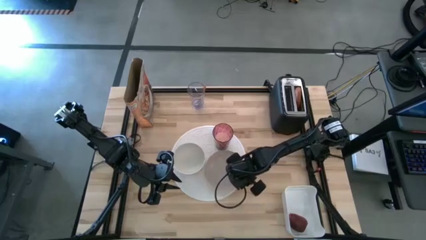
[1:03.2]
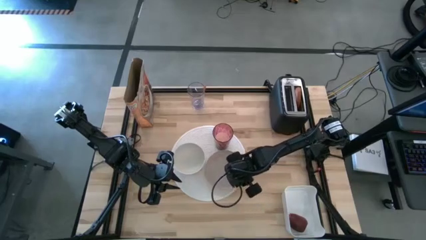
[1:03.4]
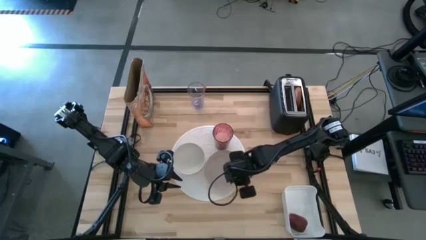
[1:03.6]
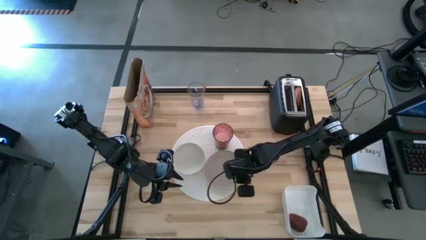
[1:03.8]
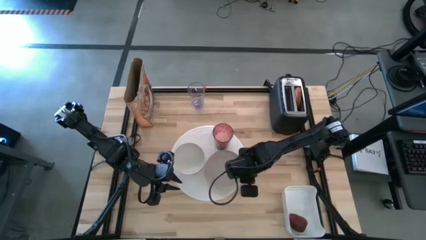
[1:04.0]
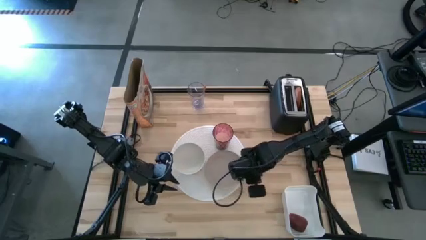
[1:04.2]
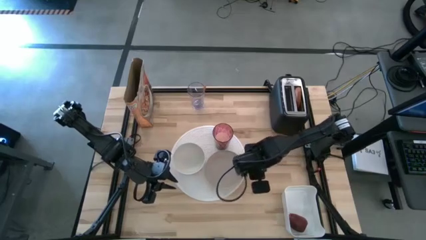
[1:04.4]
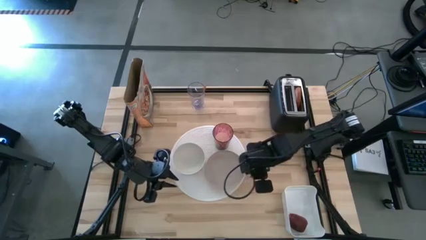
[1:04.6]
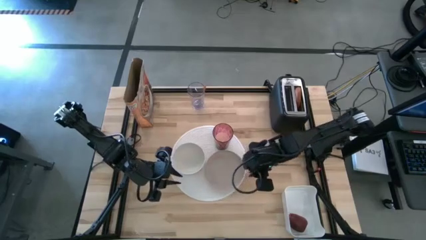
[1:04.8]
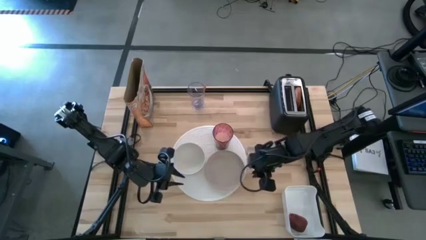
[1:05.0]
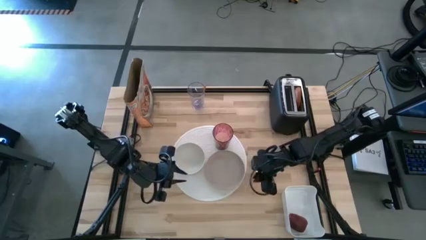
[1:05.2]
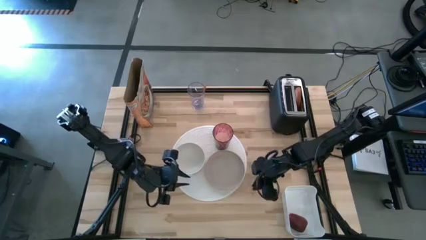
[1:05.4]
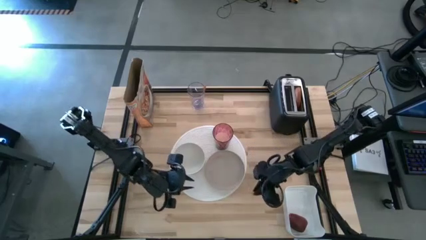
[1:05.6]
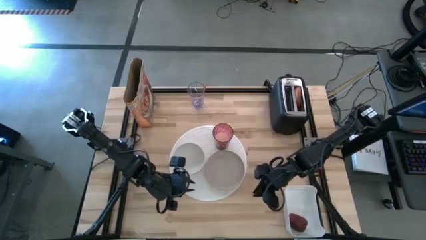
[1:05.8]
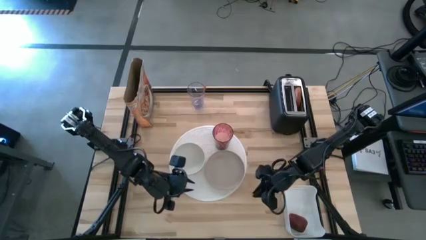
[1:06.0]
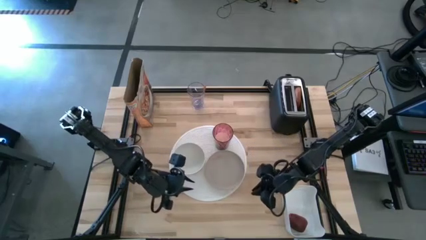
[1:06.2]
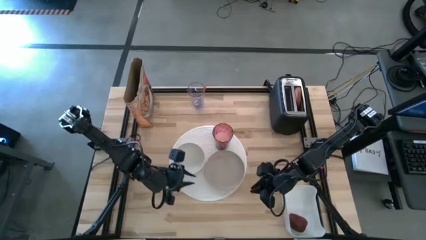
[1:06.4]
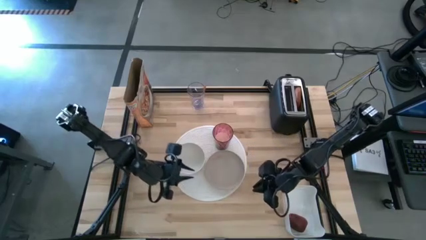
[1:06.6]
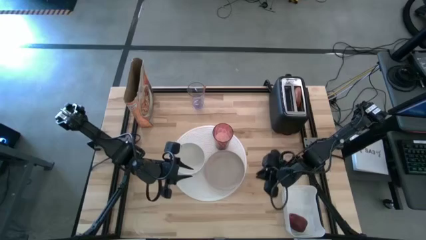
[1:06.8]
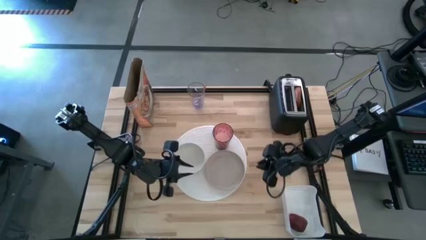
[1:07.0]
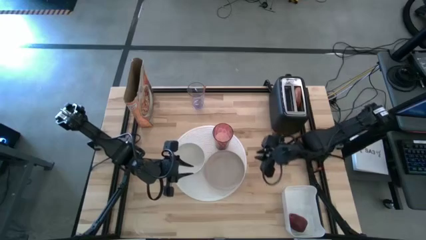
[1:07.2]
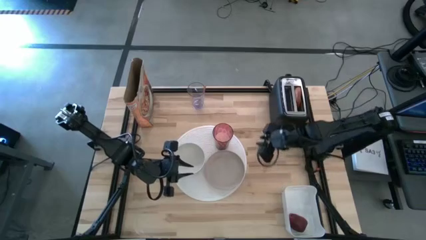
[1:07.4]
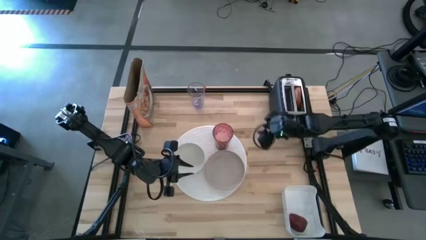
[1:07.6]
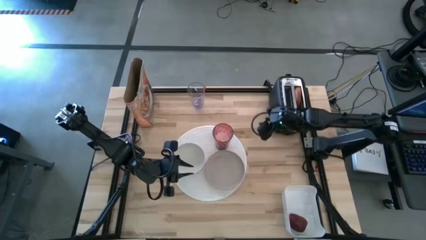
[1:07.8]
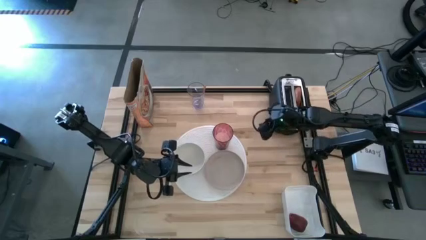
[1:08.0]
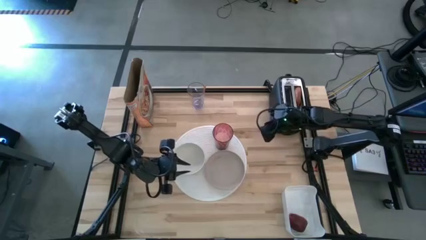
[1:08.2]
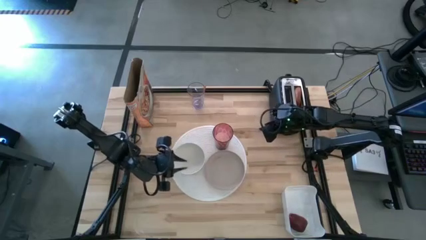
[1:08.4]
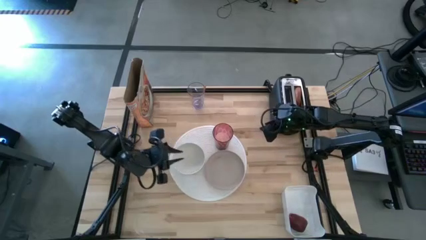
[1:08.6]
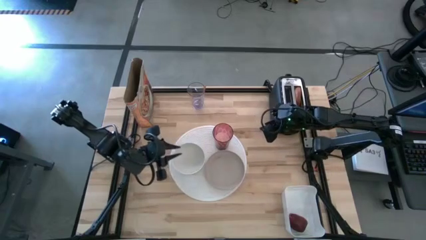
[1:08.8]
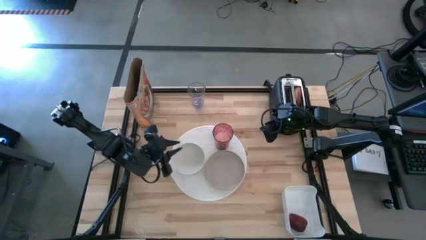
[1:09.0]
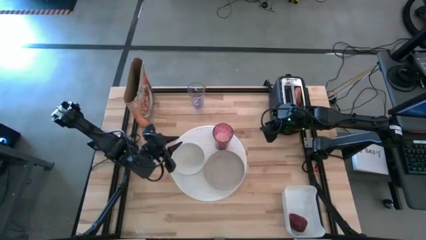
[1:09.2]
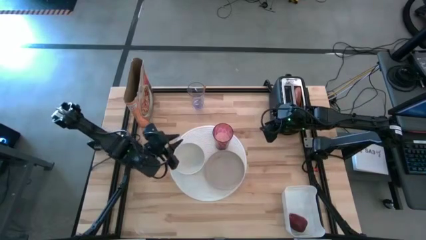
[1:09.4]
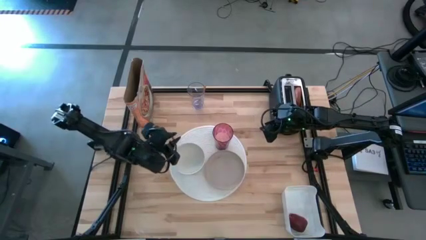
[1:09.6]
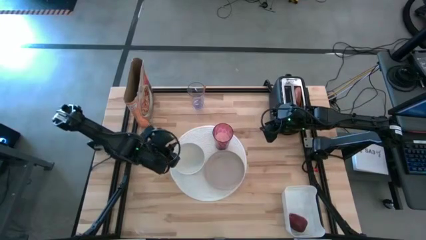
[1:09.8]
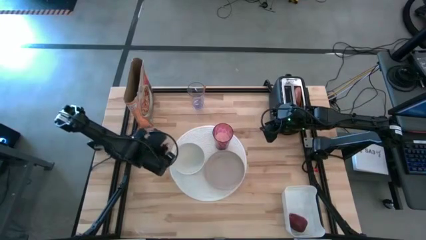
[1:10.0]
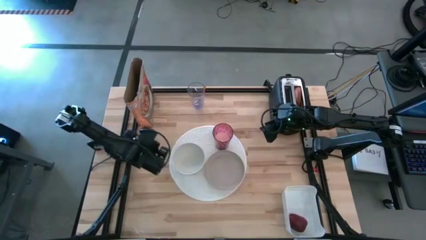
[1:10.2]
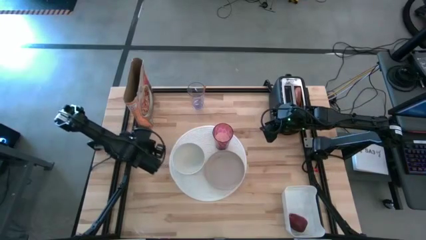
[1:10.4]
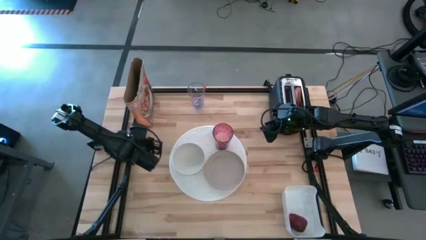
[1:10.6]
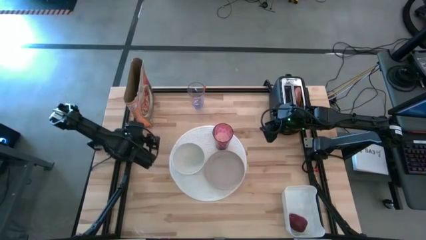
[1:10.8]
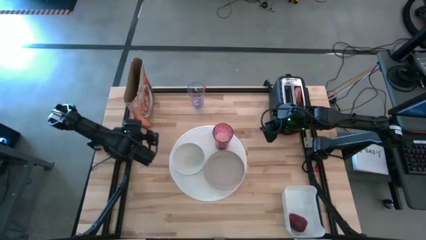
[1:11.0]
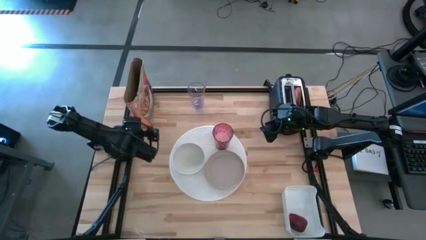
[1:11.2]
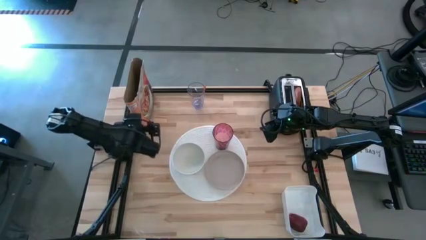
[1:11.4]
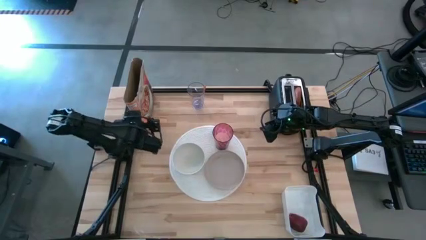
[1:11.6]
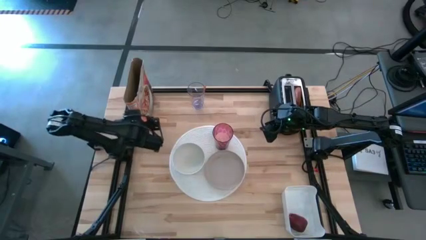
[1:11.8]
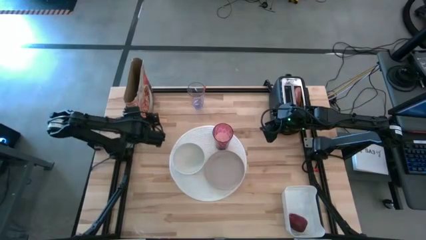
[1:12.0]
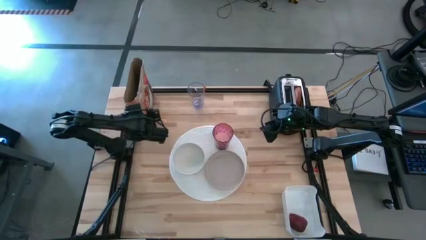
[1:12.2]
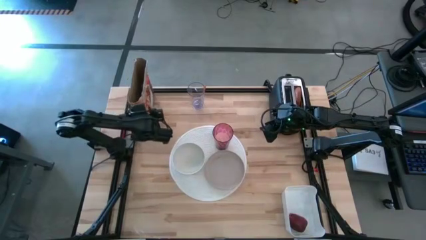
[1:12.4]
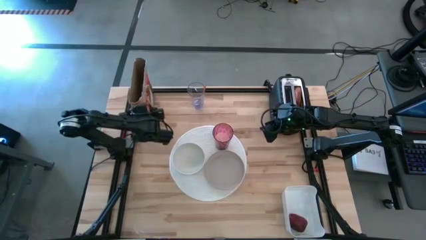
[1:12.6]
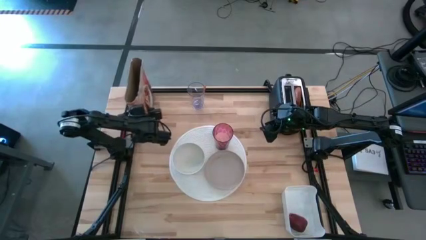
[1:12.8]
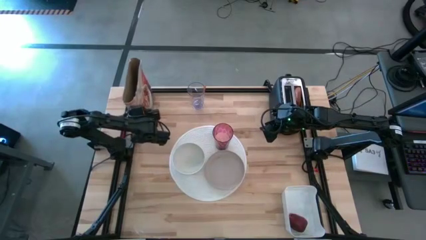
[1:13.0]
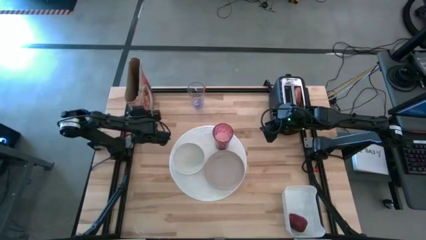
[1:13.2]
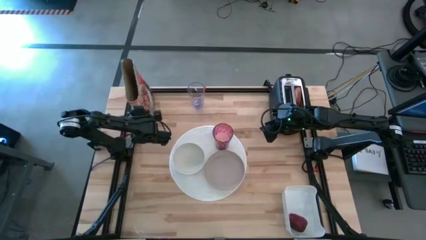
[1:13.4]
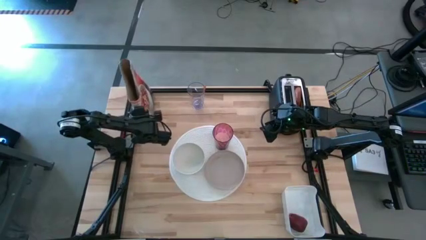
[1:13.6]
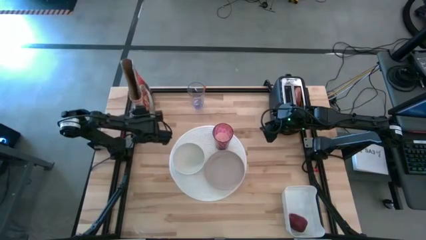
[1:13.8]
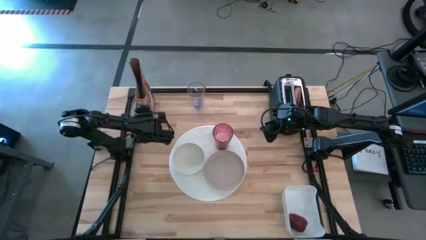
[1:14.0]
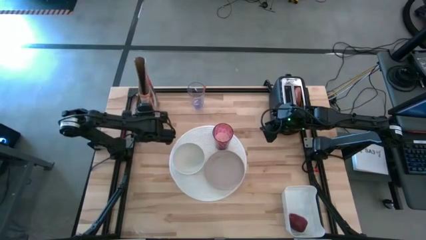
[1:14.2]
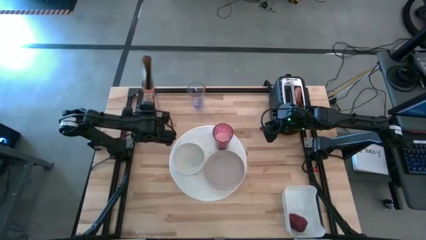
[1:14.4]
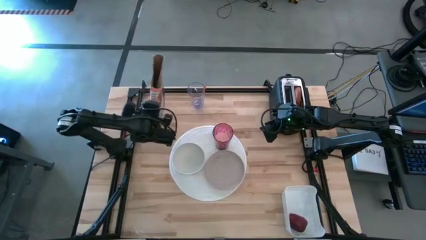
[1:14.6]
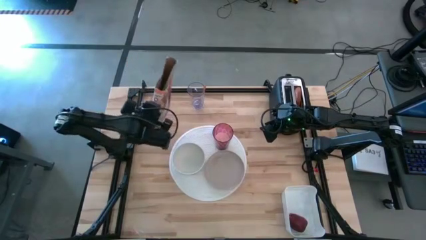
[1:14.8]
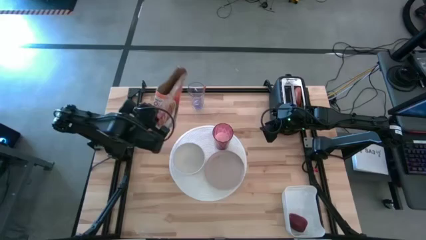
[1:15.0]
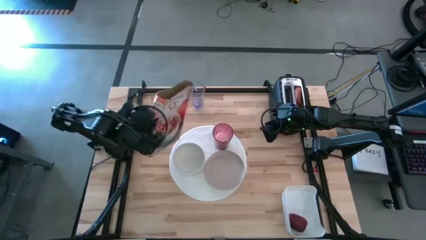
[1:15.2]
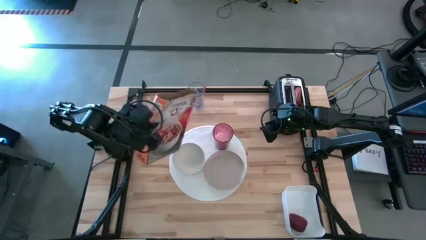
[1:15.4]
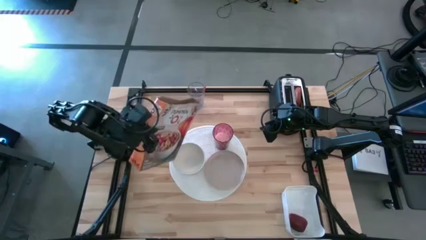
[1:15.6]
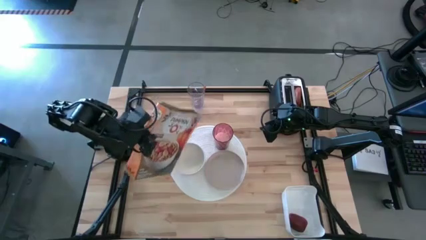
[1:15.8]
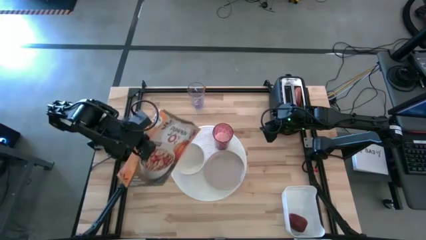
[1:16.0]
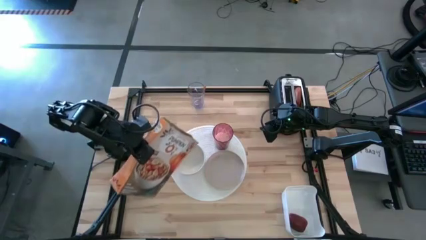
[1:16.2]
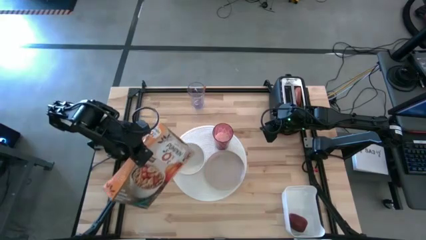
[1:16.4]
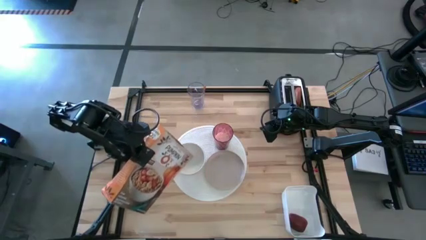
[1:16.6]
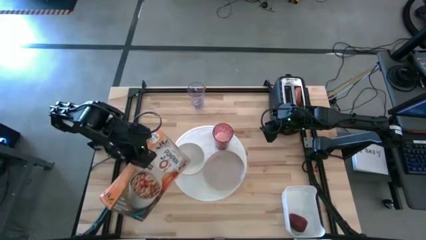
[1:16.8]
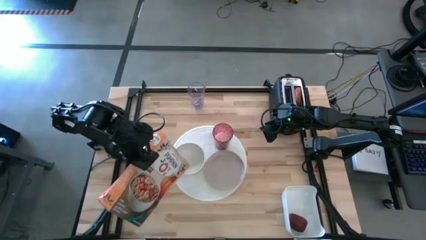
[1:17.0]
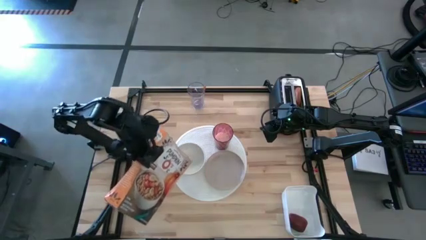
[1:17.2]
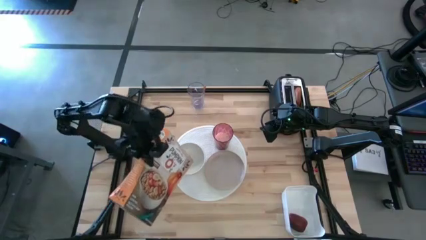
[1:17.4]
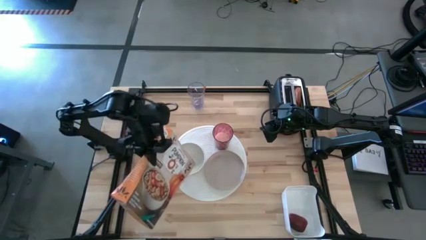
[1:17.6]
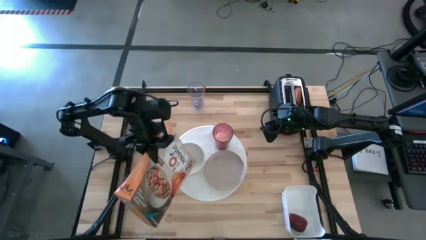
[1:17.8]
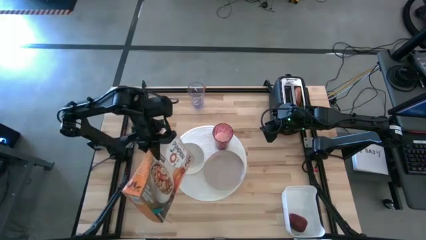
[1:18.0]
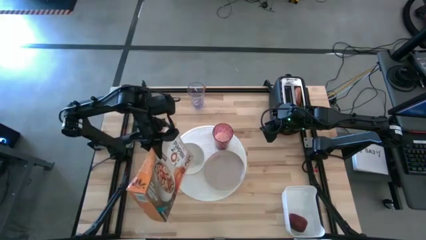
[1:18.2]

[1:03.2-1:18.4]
Task: Arrange a breakfast setting
Pour the cereal from the orange cereal box into the white bowl

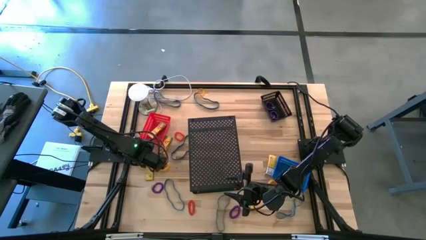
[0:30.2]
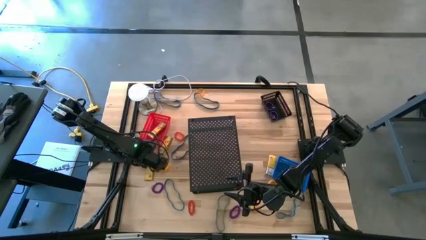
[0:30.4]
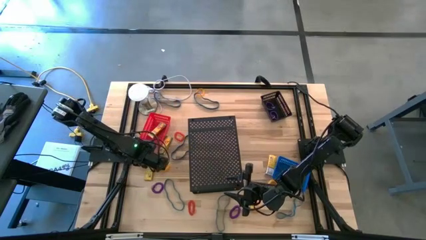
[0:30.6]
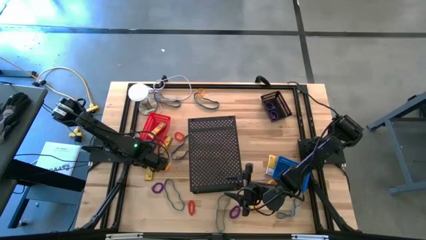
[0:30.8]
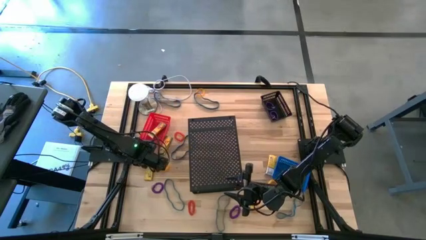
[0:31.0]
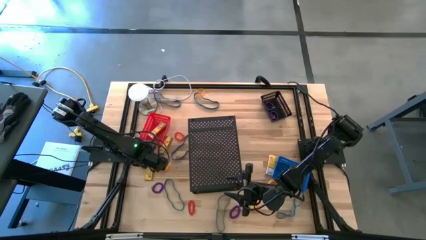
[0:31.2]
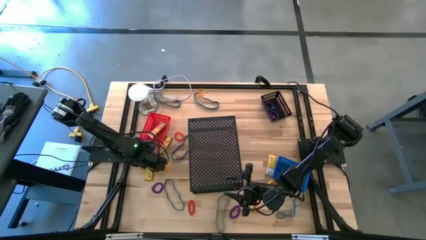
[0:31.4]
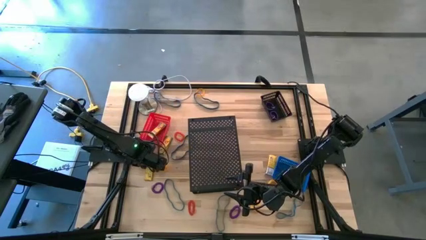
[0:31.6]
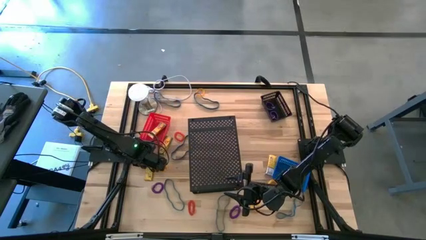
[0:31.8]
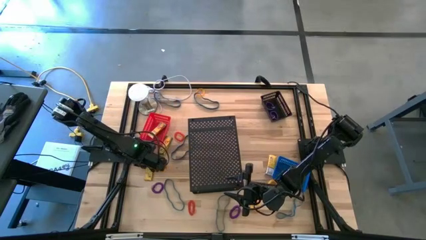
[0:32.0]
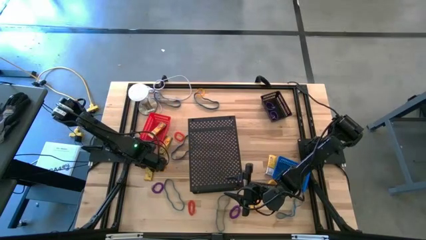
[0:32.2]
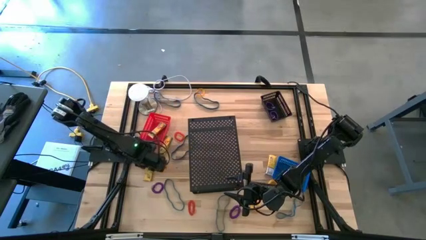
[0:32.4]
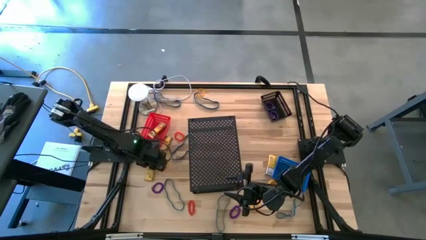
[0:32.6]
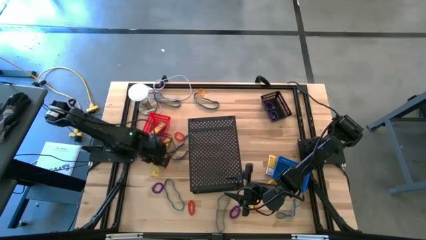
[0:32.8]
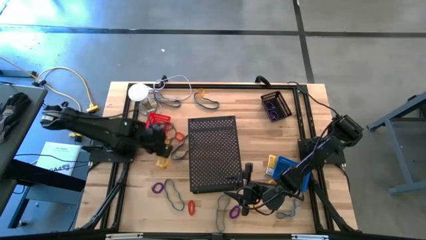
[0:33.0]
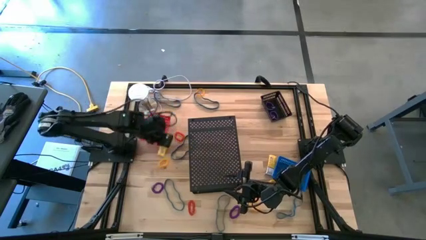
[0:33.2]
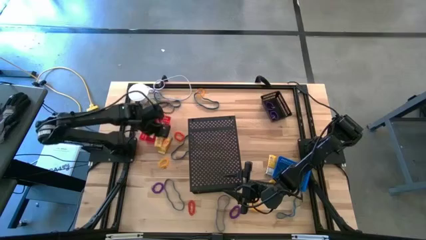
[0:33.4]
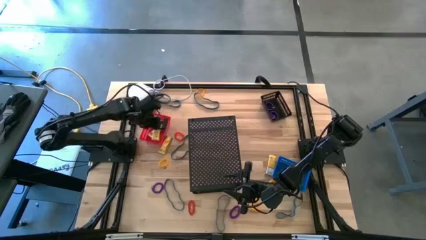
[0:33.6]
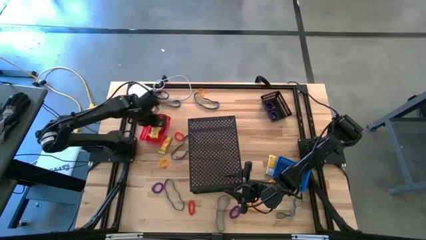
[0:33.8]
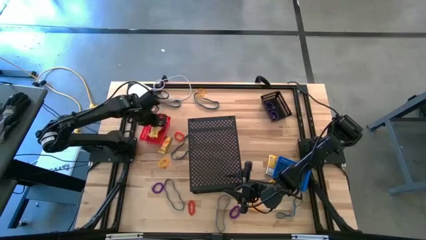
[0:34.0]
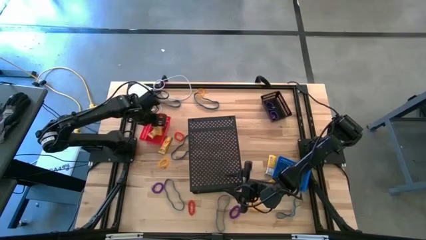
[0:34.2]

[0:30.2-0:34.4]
Task: Pick & Place Office Desk Supplies
Put the yellow crayon box into the red bin
